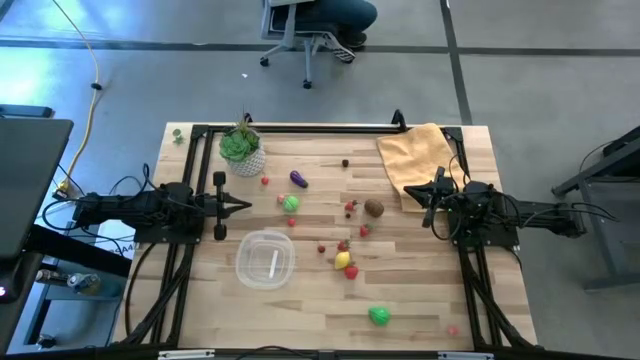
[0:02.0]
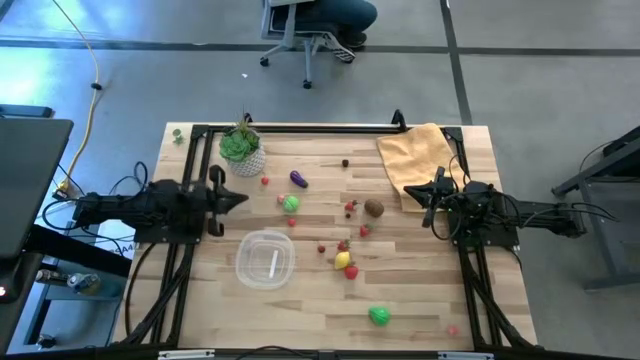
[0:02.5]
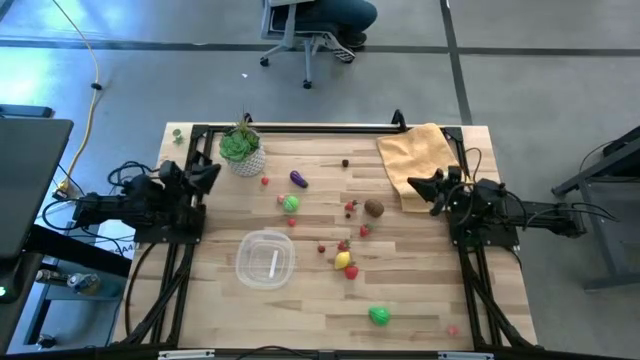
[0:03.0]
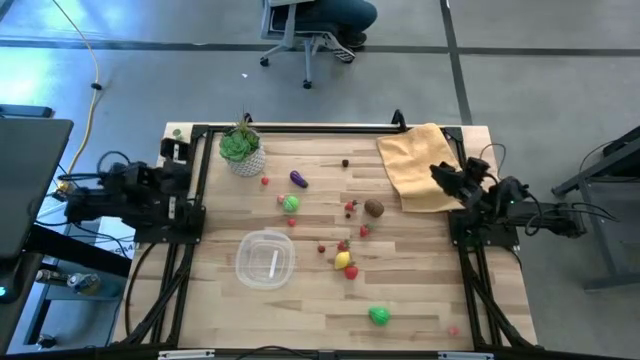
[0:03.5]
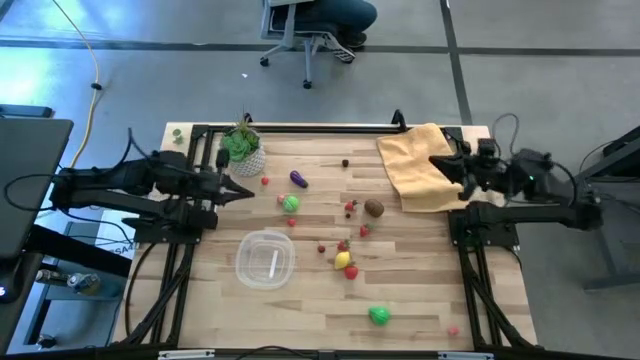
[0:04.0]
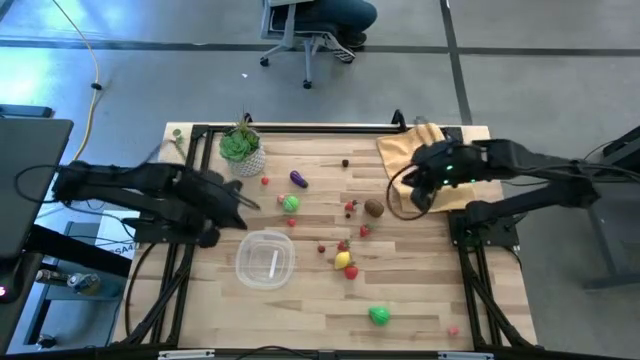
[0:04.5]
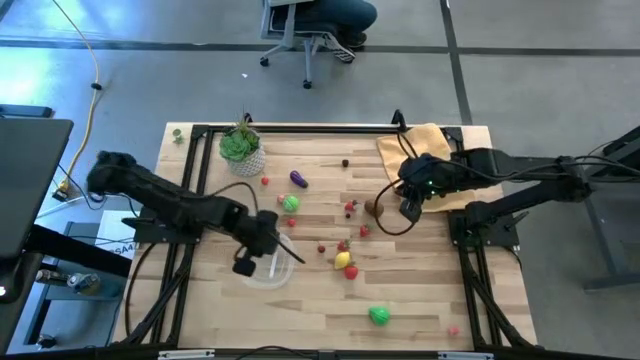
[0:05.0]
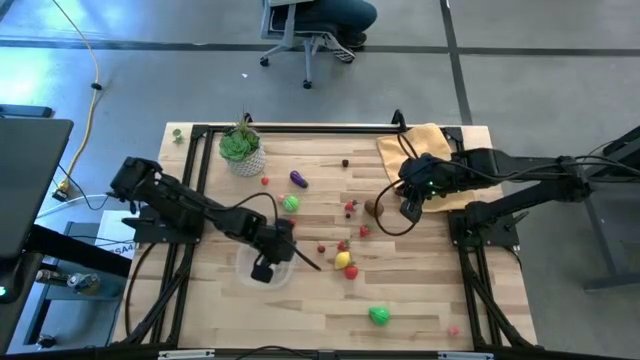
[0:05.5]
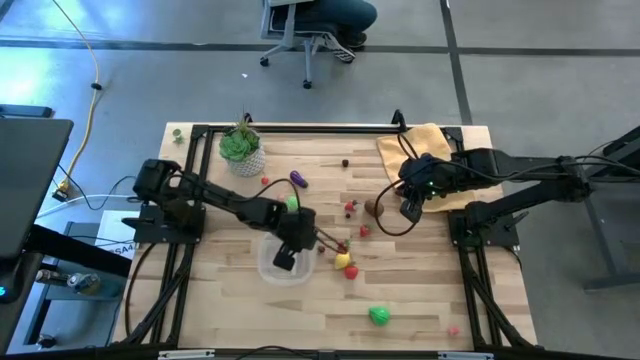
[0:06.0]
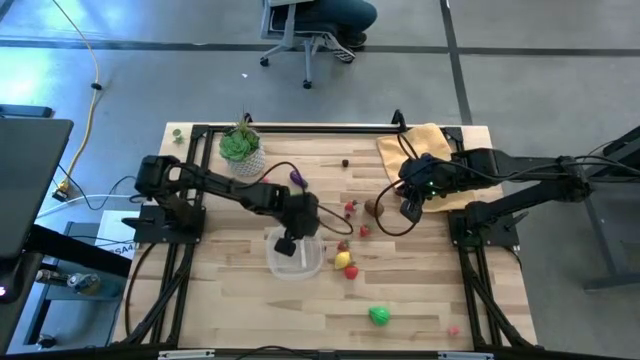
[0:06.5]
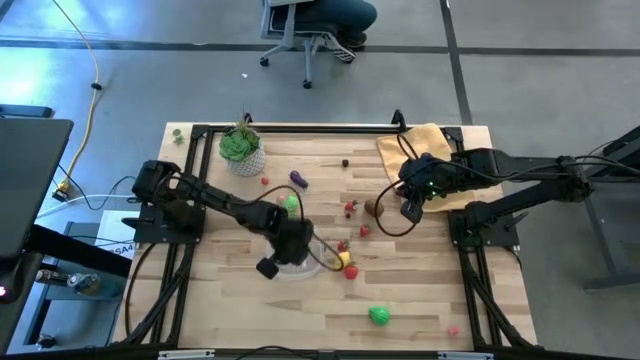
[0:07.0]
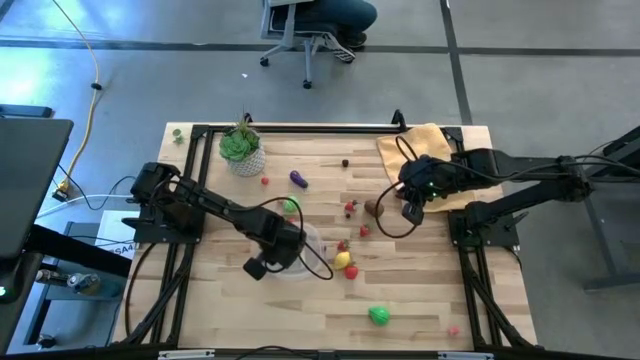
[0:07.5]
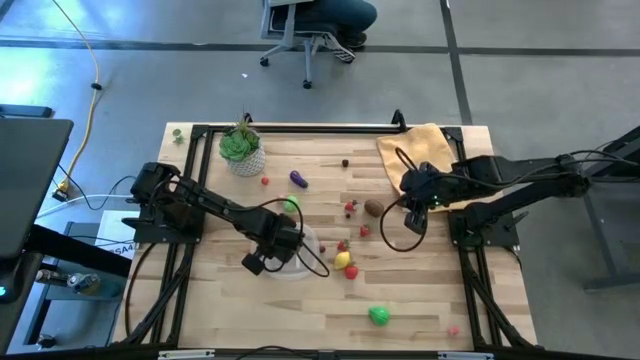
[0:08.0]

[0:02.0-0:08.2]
Task: Pick and placing Produce into tupperware
Adjust the transparent bin

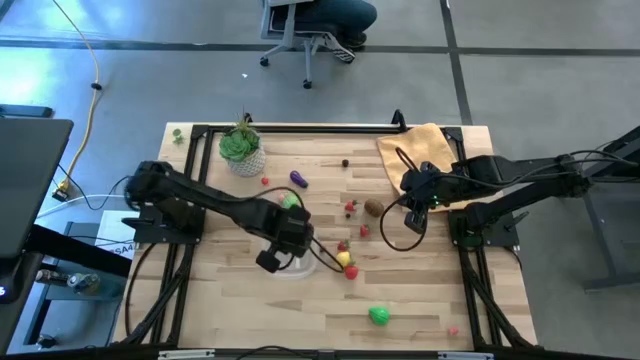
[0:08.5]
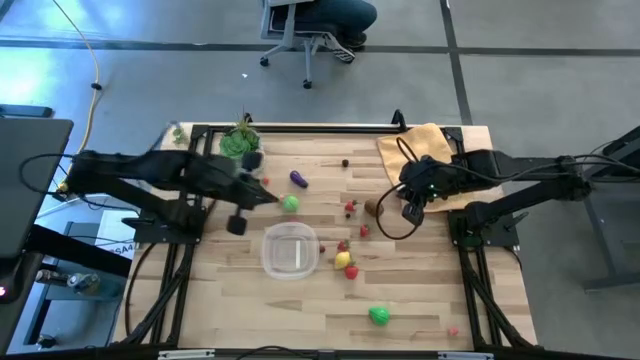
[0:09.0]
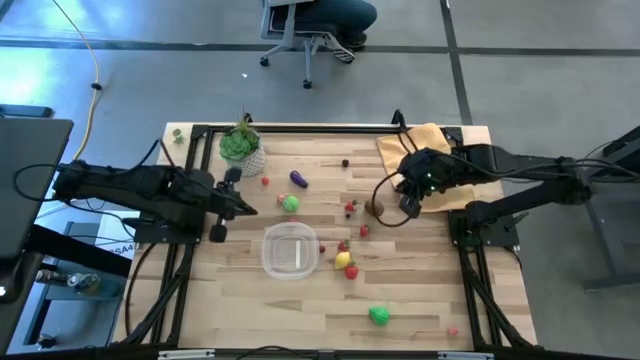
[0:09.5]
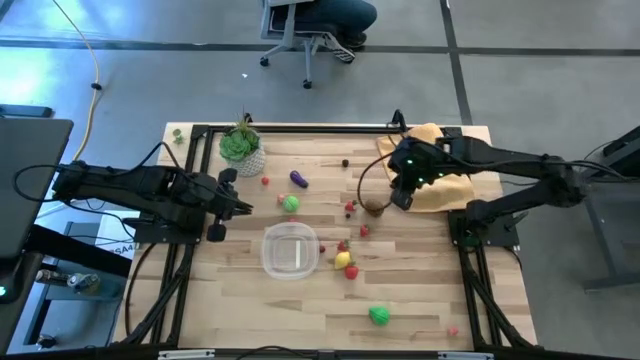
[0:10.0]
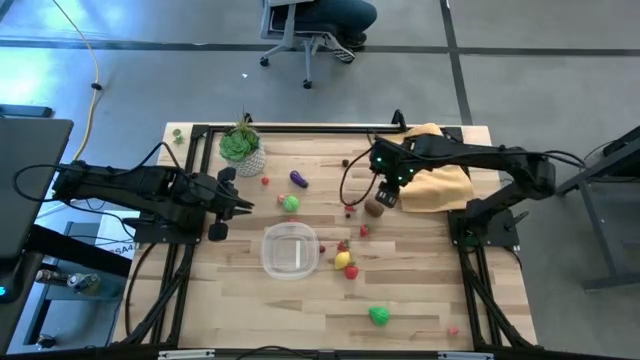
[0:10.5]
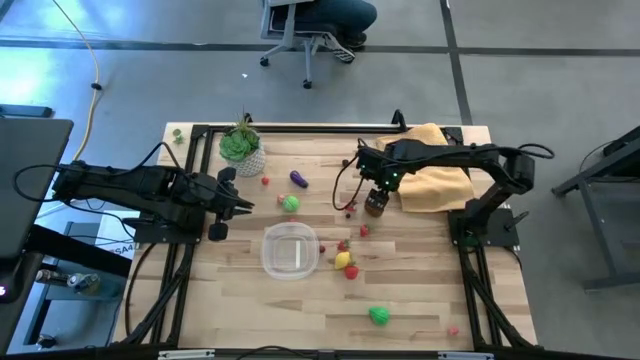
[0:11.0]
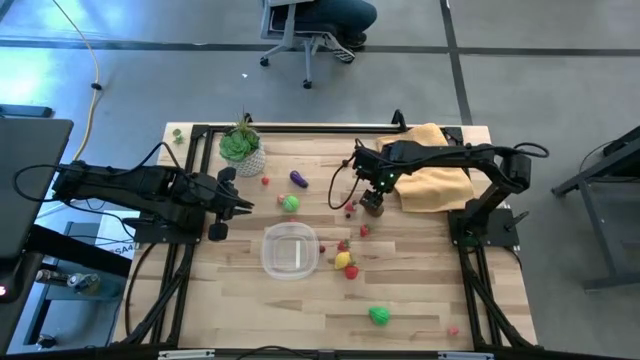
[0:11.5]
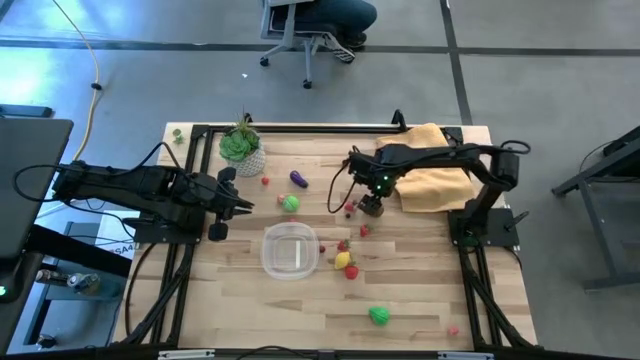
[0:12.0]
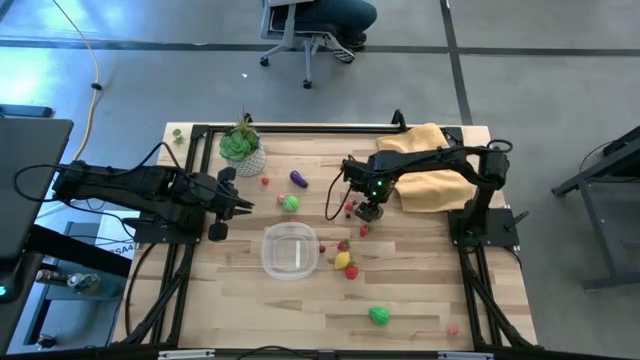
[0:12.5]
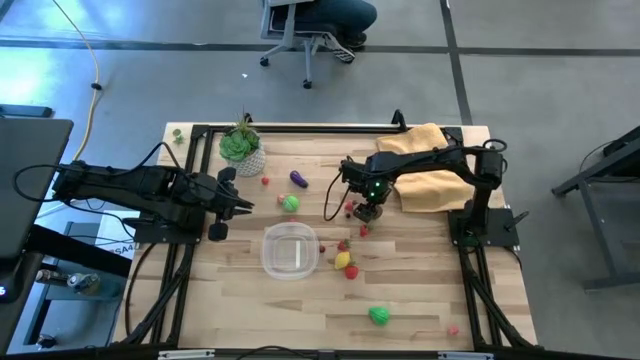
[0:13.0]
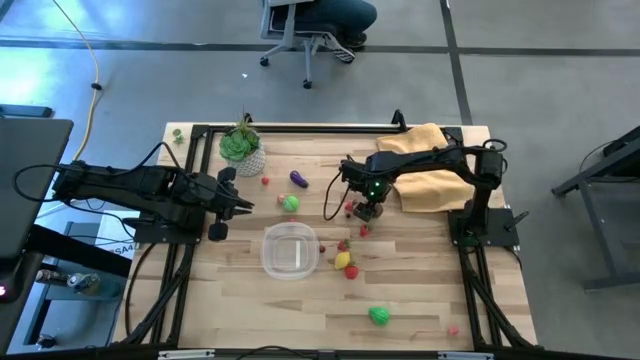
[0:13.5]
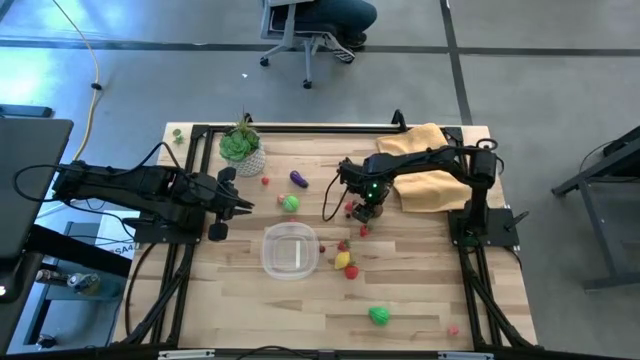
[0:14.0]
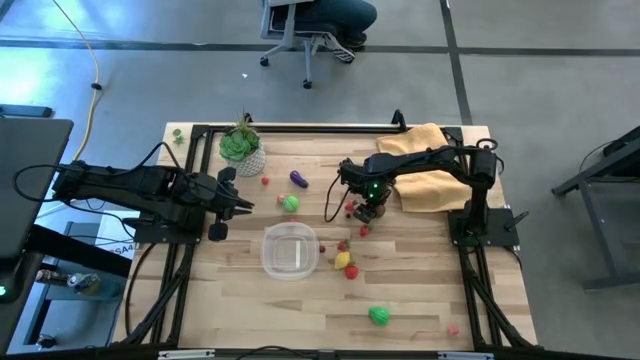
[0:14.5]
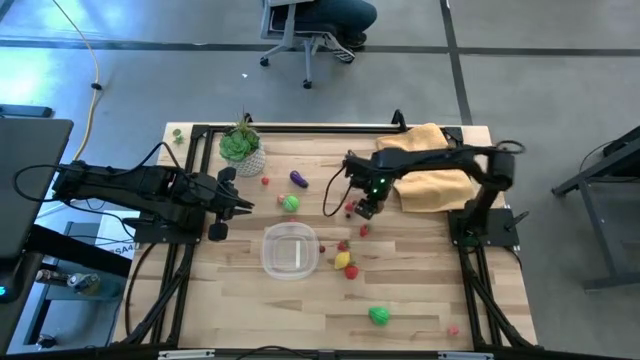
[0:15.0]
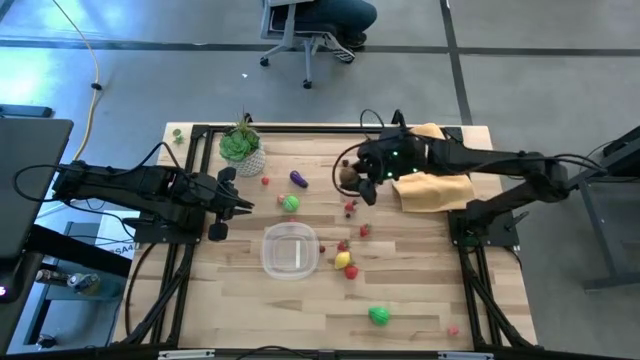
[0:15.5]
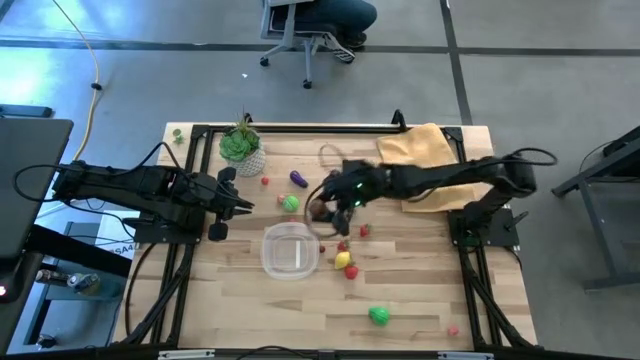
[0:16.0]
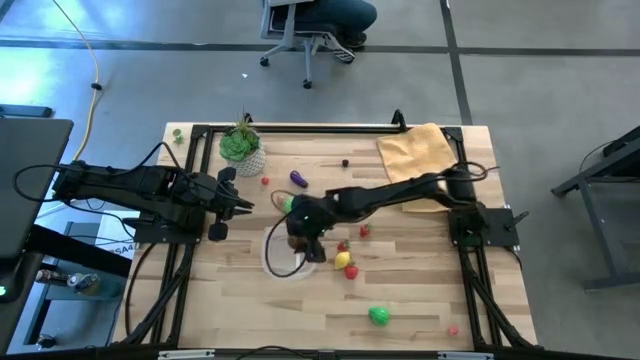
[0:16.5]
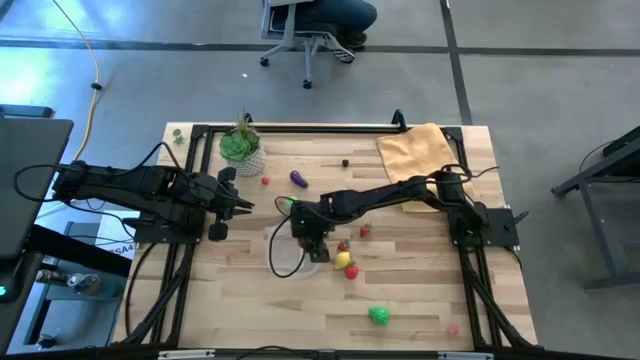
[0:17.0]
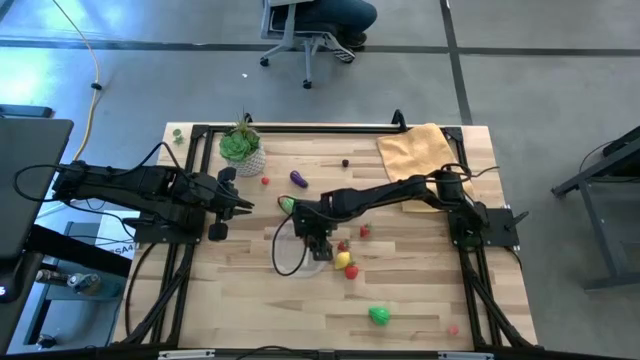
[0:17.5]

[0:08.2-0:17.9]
Put the brown kiwi into the transparent bin

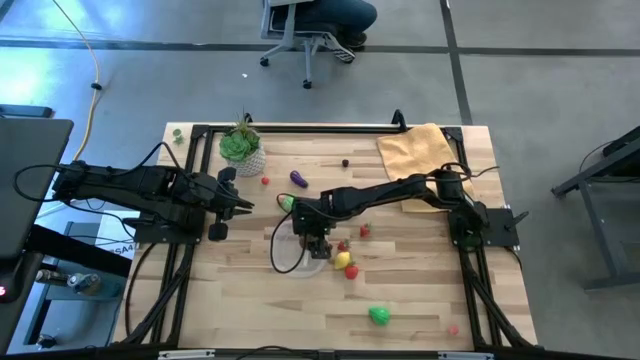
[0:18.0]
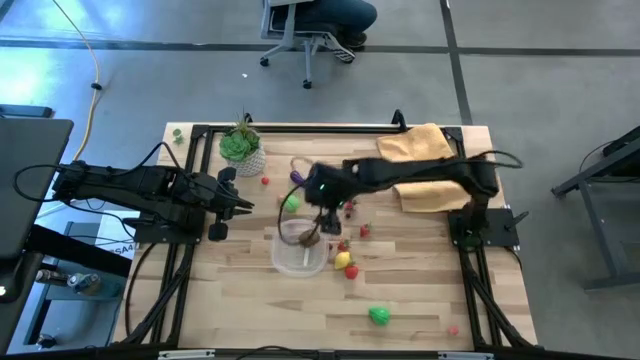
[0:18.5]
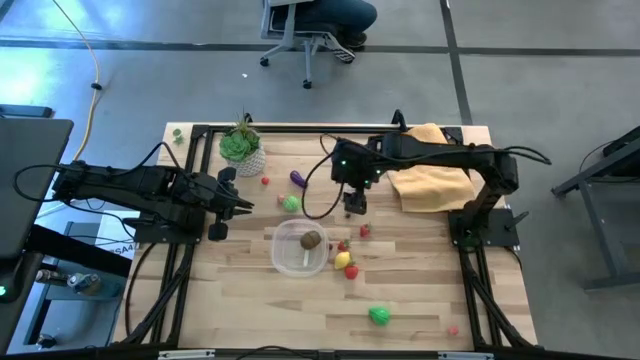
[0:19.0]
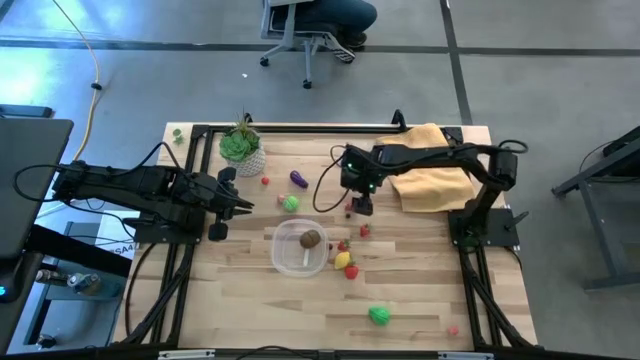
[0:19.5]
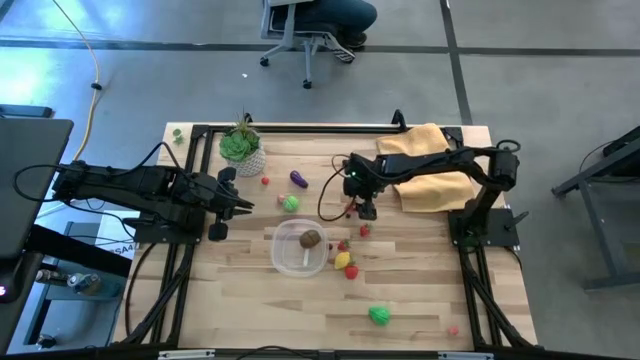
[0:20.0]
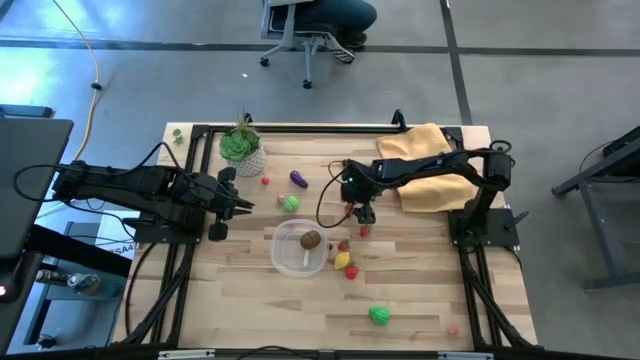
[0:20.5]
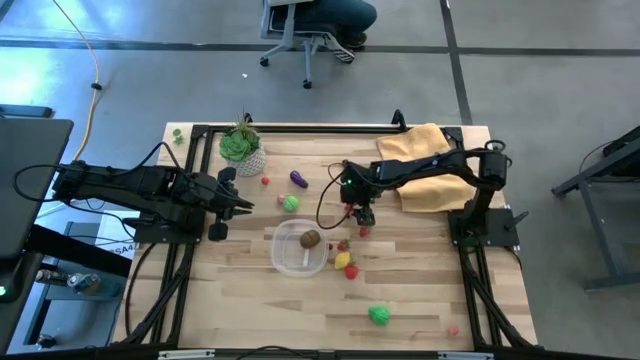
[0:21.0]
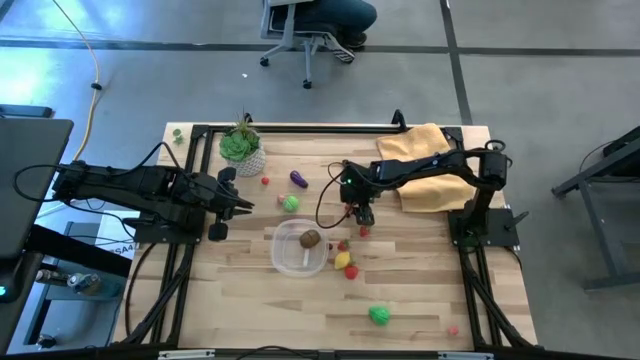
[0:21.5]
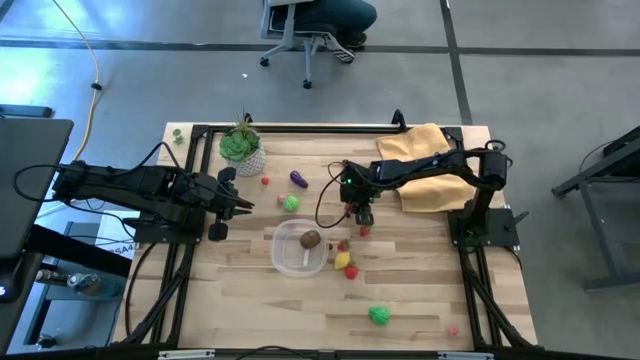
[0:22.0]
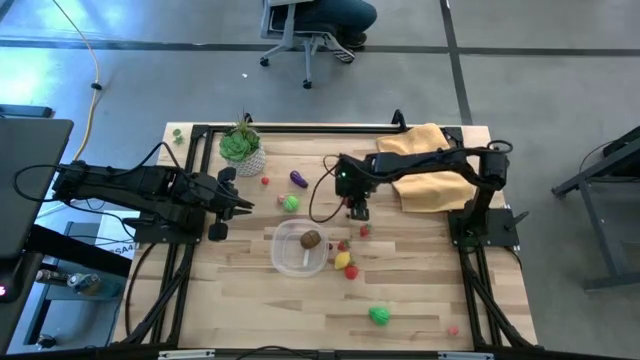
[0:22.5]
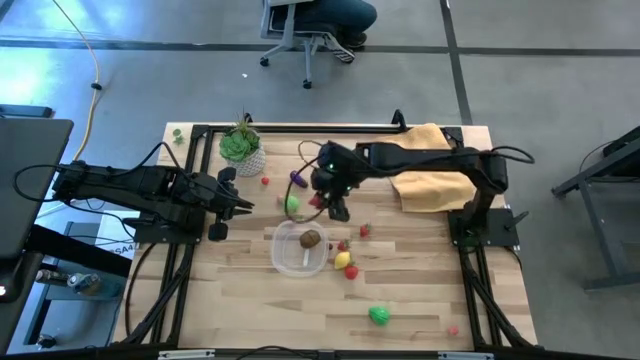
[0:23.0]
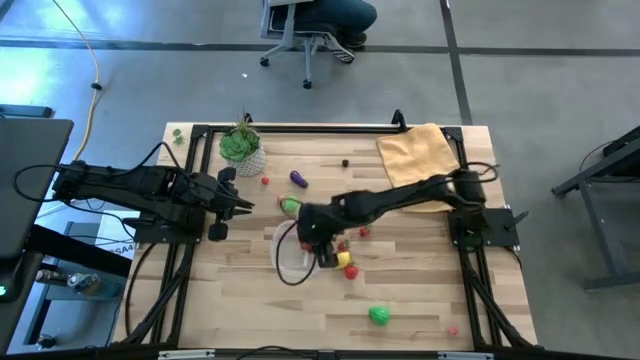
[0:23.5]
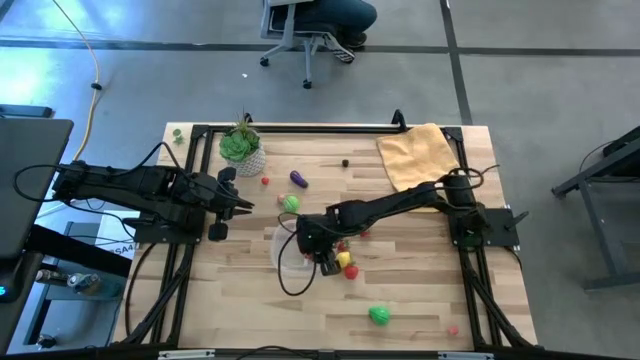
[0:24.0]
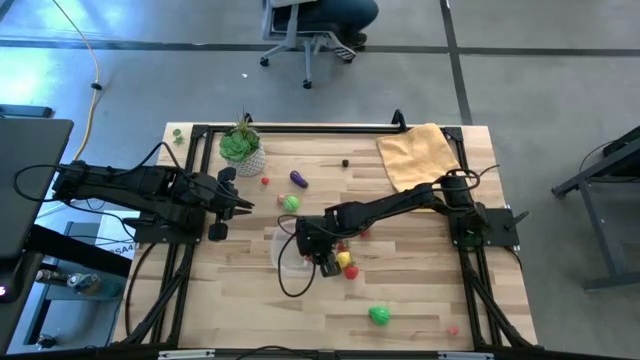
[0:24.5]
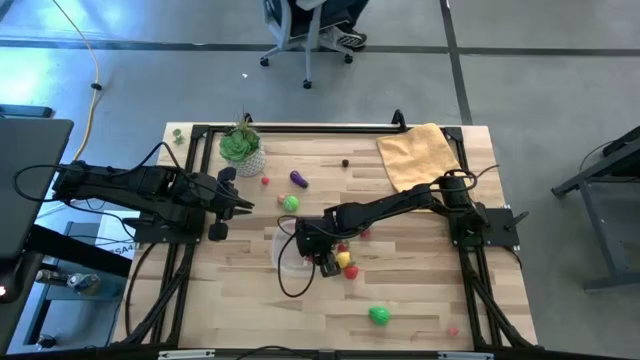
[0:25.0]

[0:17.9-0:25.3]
Put the red strawberry into the transparent bin
